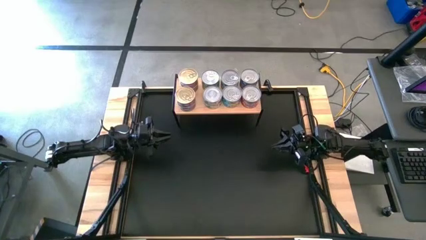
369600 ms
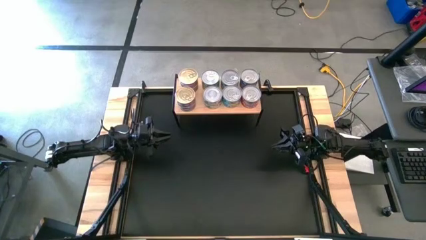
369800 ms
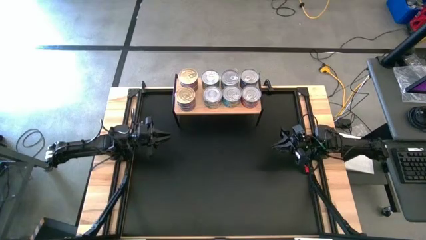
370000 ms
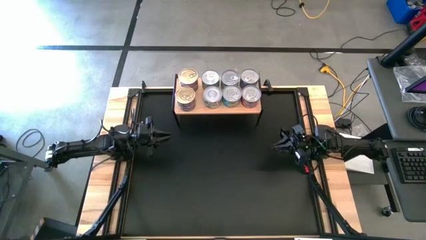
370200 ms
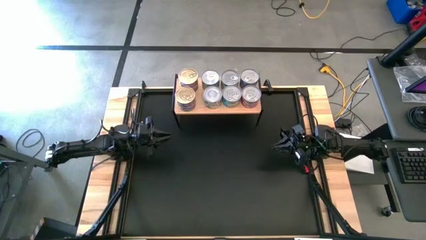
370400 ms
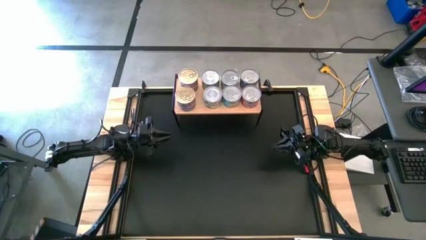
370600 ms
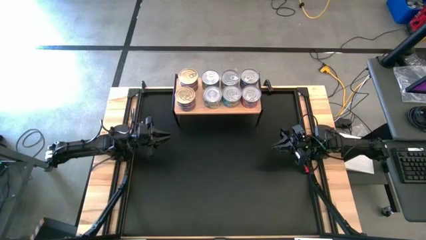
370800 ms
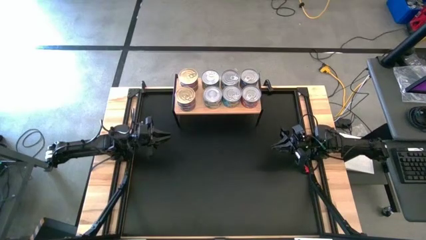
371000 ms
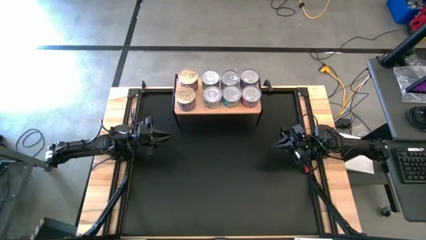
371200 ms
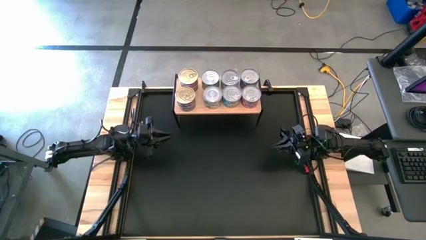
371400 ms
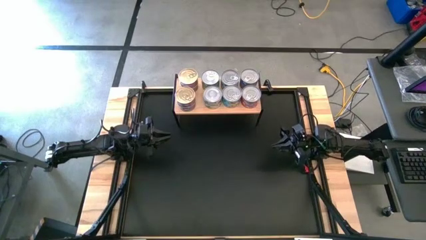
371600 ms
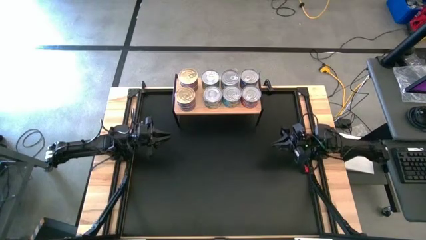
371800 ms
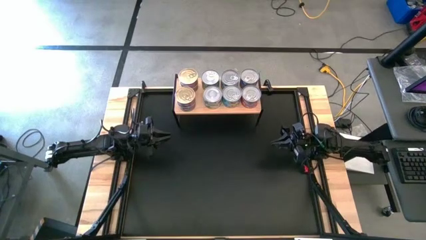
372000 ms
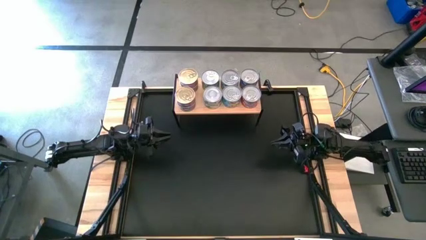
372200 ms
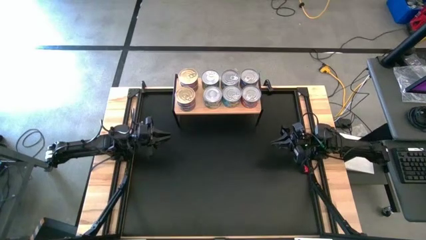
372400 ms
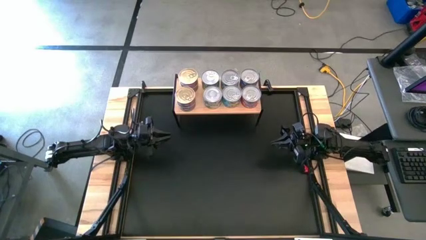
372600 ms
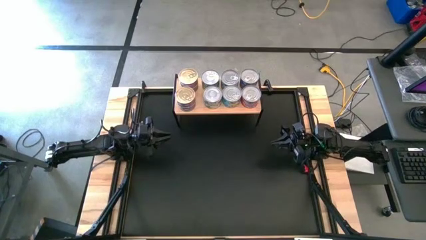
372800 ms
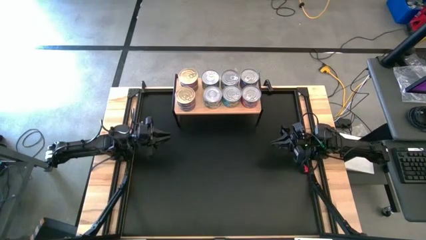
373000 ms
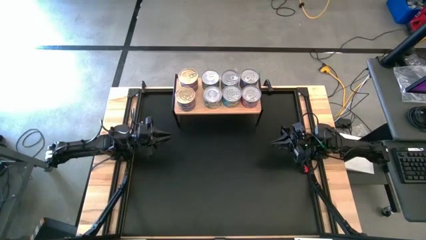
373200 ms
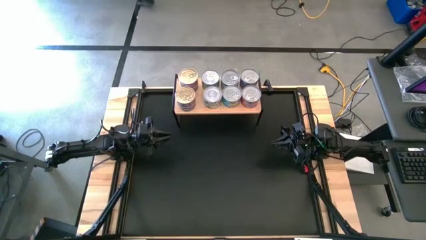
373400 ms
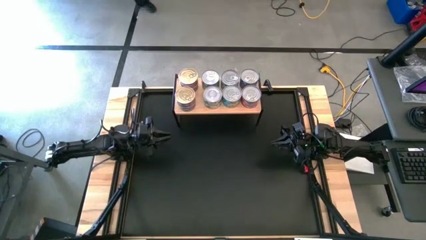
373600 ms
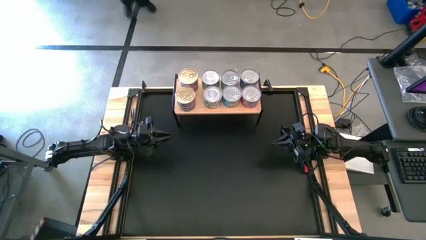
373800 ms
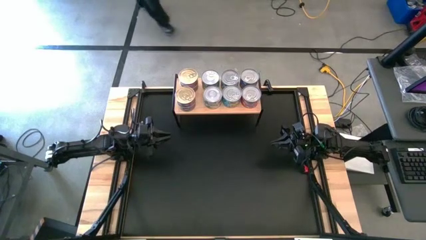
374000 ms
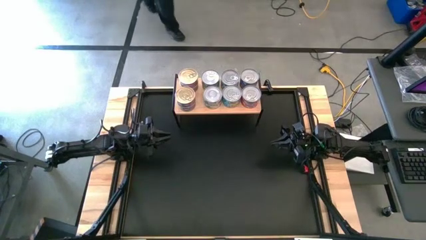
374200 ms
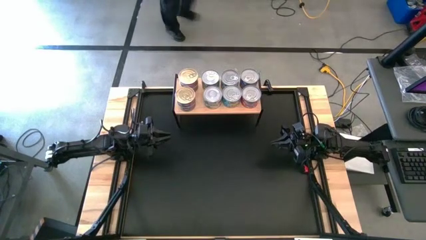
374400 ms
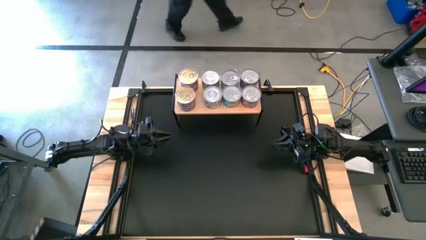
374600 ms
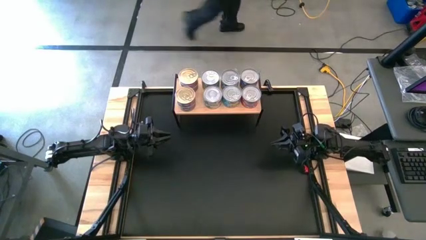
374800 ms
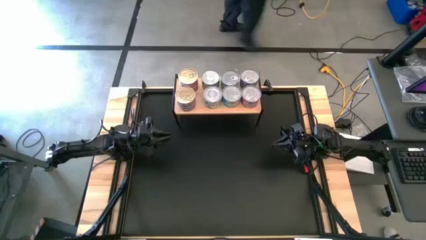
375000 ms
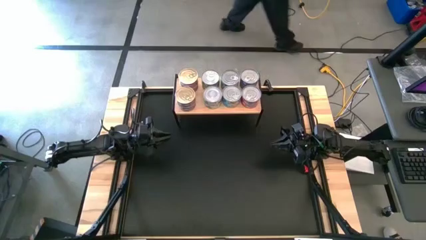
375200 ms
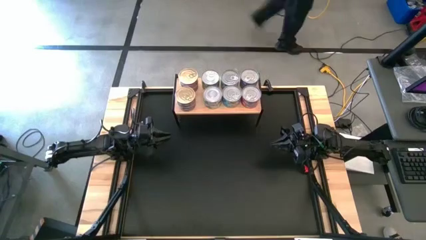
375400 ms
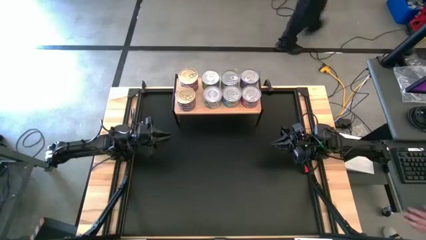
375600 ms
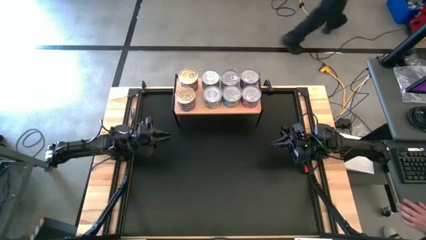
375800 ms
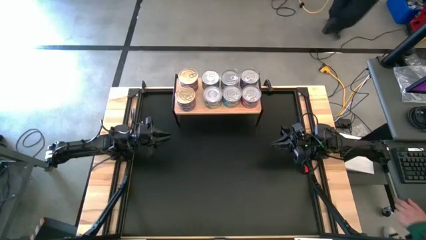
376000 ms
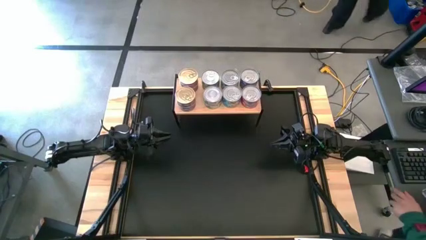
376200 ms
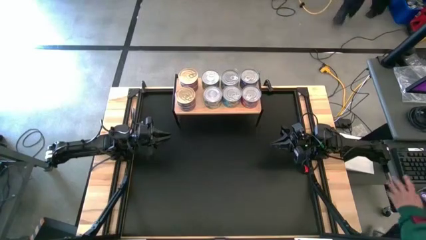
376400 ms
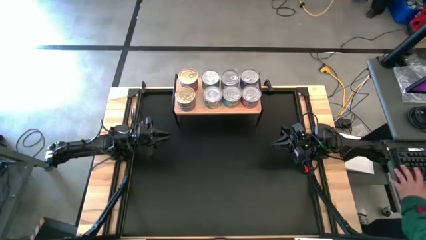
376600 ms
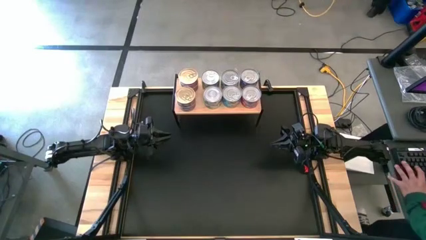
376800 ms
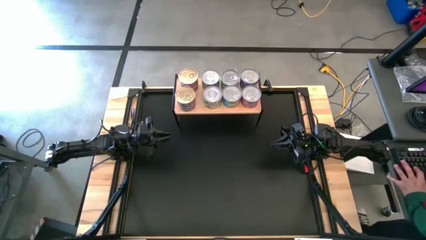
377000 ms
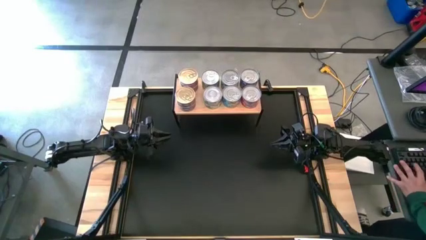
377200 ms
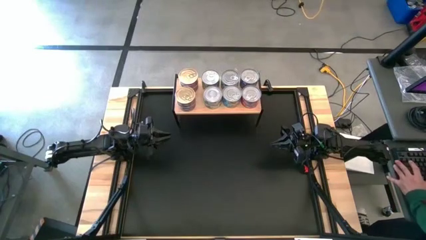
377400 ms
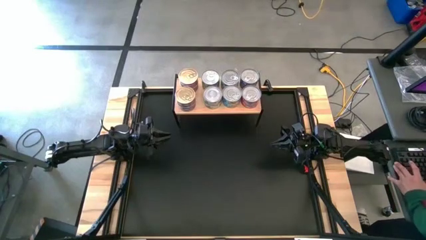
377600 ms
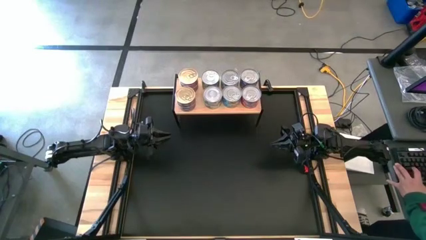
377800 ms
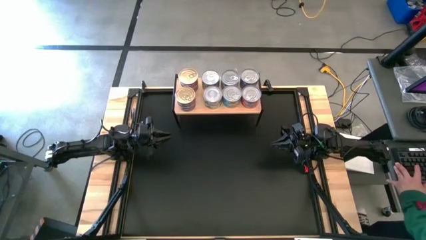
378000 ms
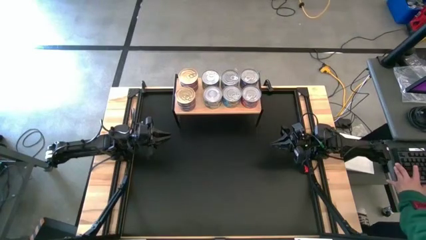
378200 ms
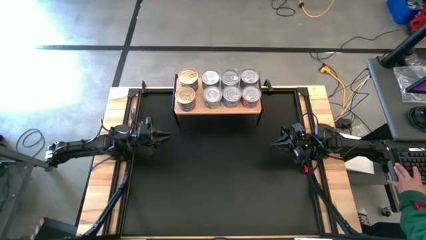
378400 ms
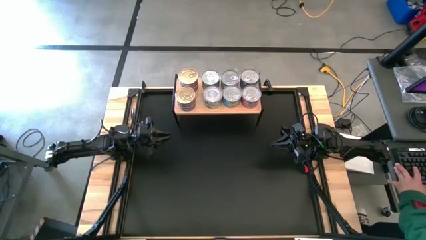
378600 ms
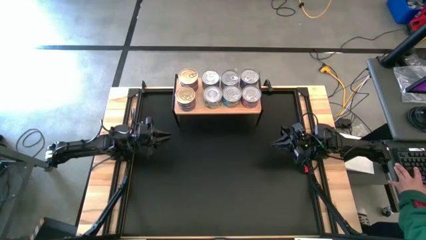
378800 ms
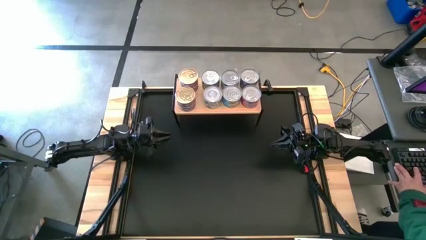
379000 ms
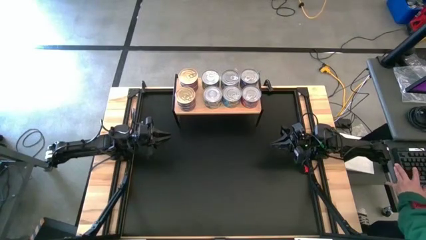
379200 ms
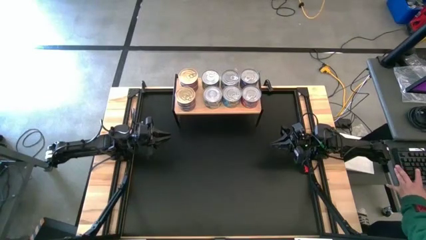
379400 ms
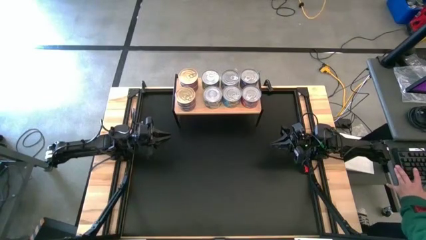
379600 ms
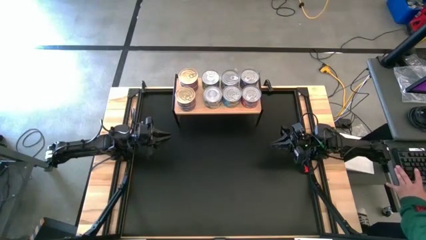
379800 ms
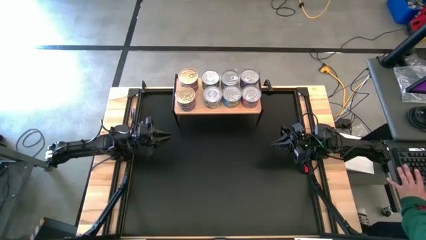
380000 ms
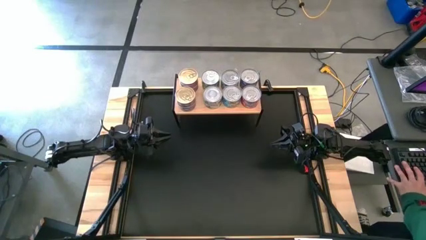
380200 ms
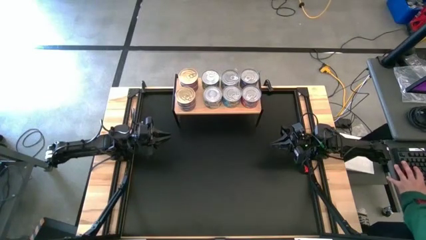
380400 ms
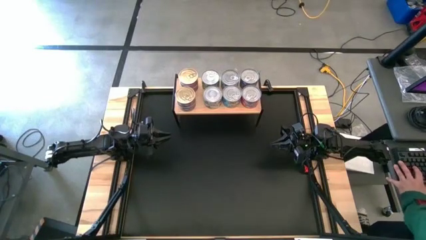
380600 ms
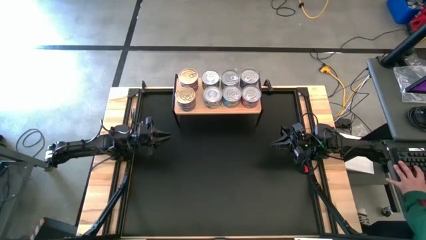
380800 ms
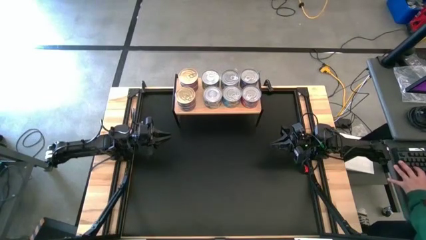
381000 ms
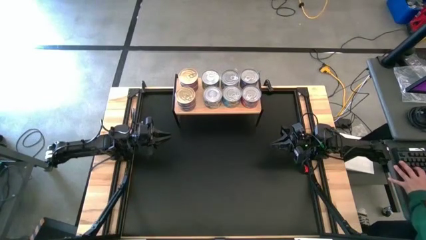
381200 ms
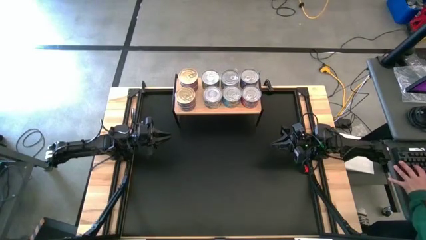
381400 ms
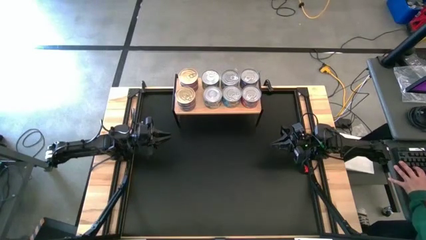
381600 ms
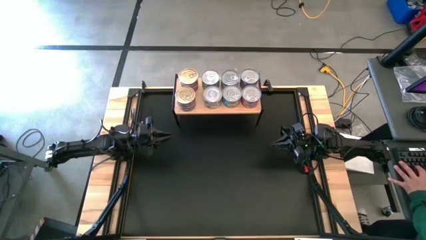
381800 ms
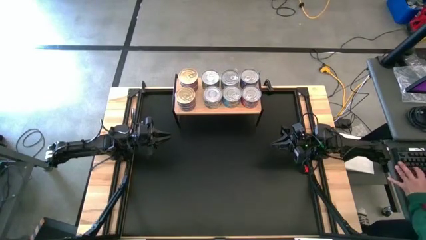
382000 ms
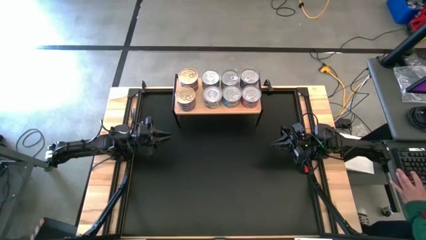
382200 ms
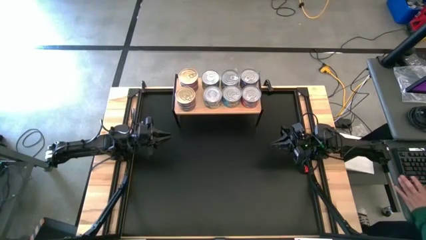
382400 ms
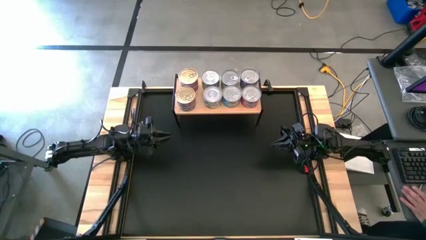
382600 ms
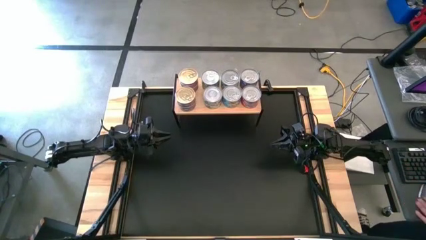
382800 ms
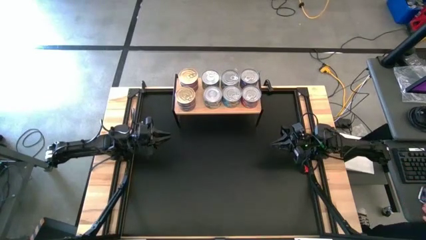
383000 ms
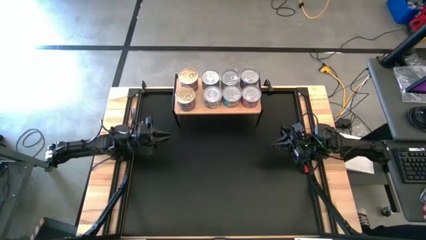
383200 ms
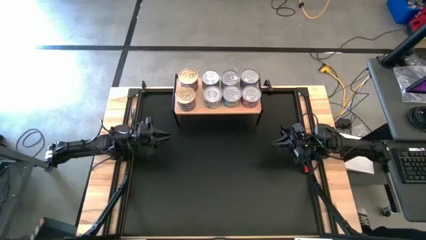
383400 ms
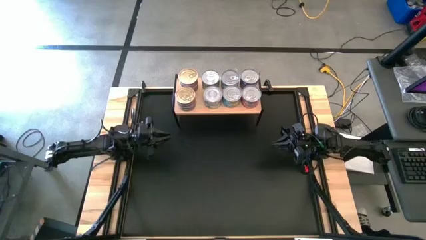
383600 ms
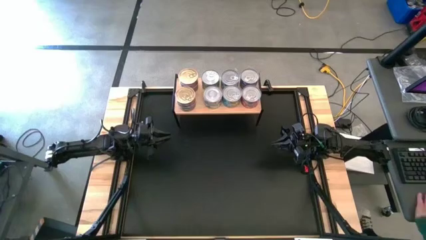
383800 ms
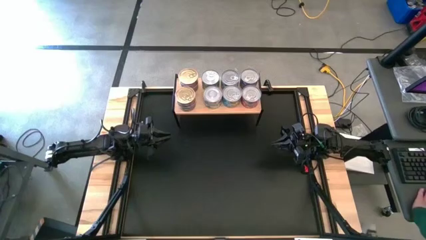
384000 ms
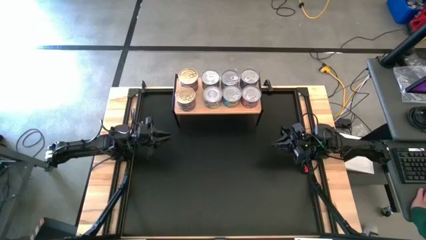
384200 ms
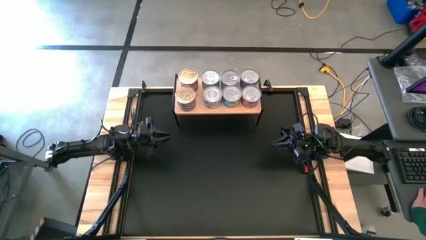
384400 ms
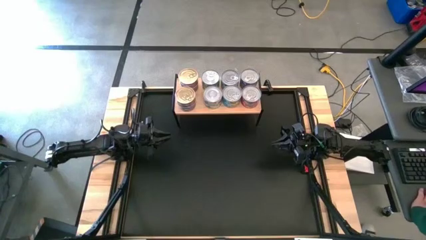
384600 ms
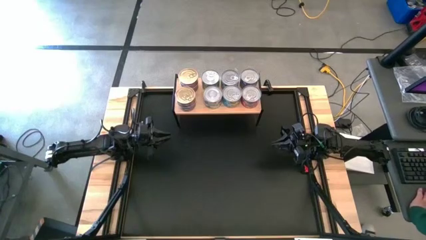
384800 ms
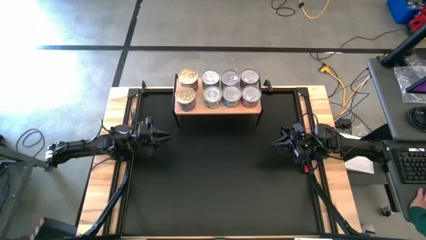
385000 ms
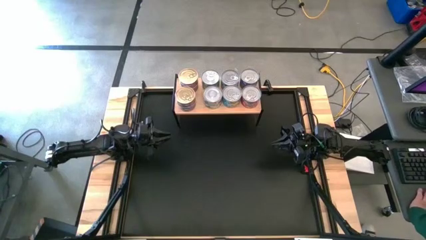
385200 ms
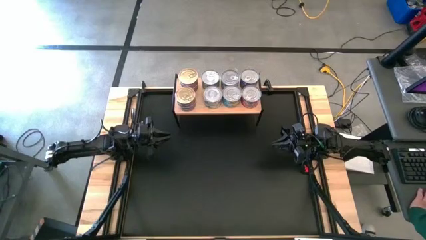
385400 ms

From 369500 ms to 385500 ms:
Task: Stack canned seafood by type on shelf
Return to Home Position
